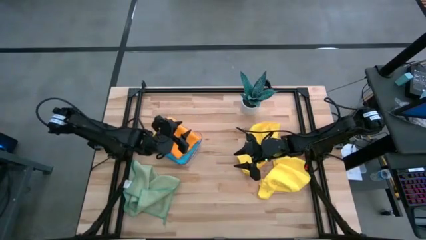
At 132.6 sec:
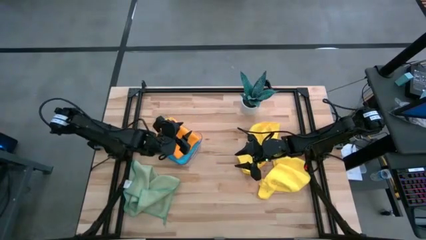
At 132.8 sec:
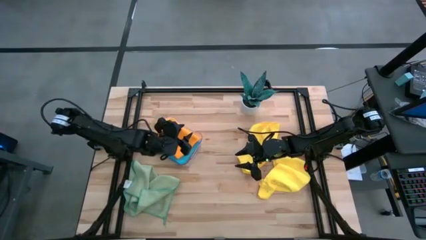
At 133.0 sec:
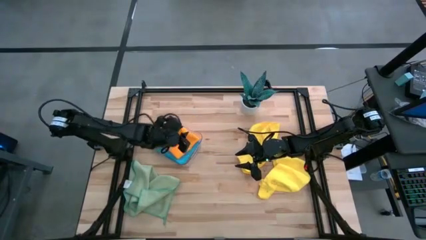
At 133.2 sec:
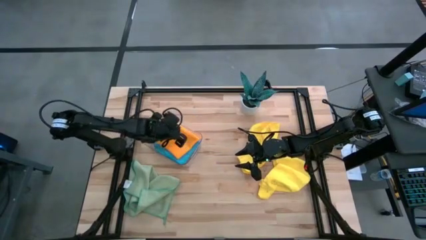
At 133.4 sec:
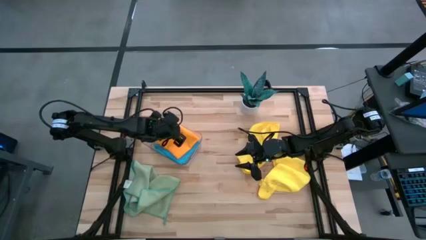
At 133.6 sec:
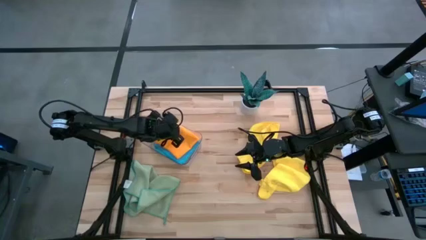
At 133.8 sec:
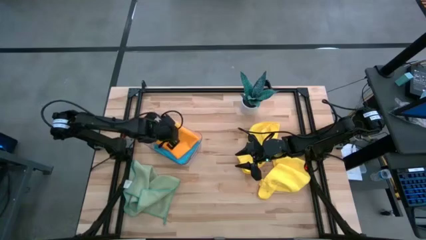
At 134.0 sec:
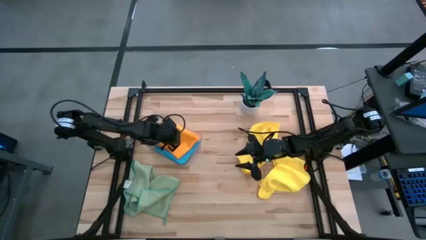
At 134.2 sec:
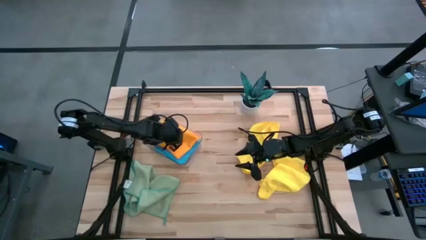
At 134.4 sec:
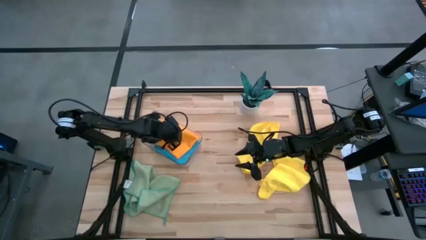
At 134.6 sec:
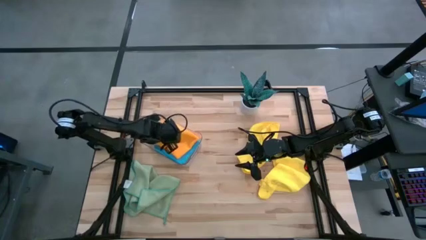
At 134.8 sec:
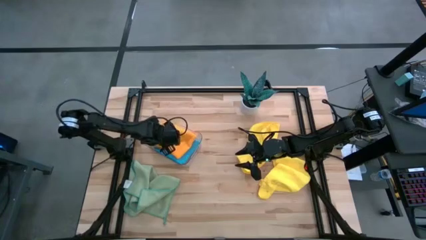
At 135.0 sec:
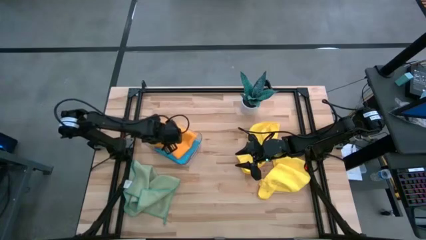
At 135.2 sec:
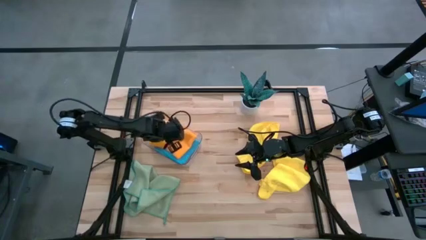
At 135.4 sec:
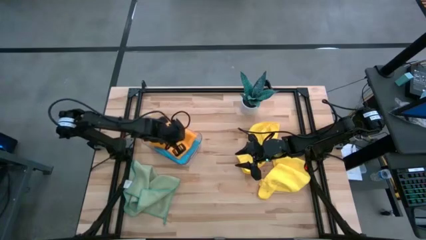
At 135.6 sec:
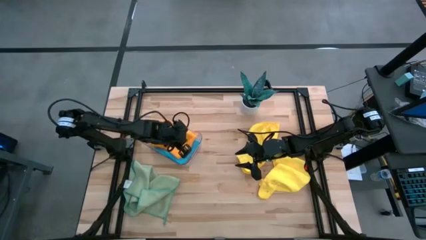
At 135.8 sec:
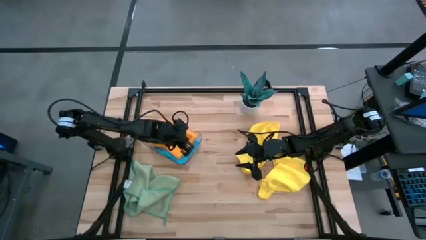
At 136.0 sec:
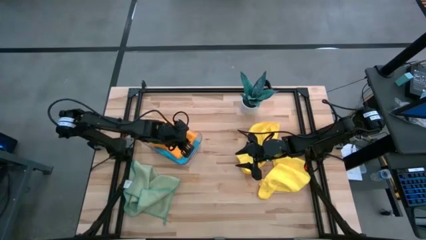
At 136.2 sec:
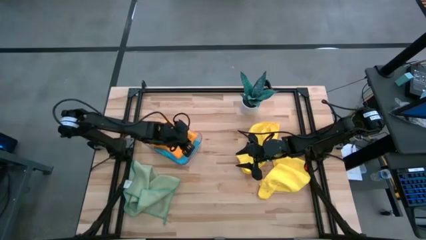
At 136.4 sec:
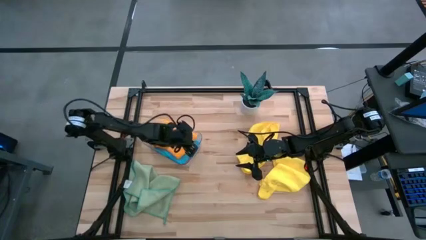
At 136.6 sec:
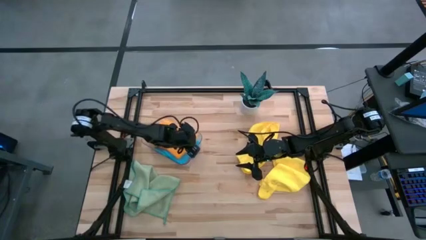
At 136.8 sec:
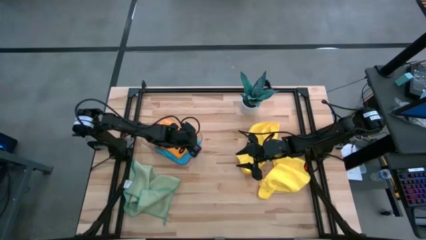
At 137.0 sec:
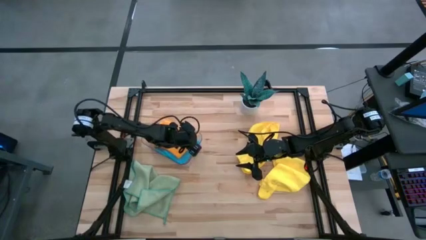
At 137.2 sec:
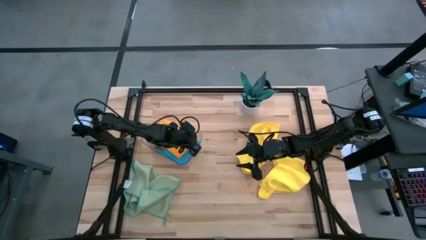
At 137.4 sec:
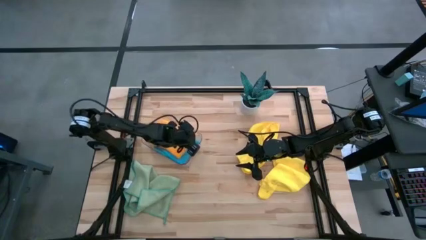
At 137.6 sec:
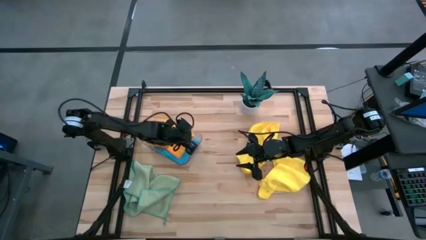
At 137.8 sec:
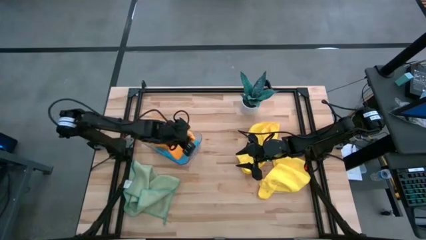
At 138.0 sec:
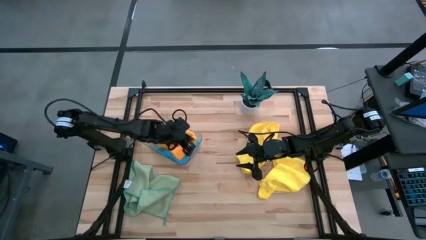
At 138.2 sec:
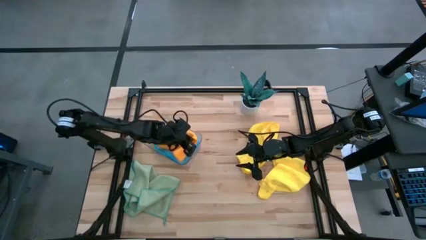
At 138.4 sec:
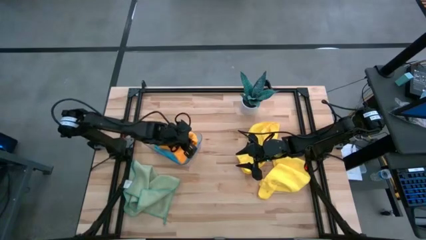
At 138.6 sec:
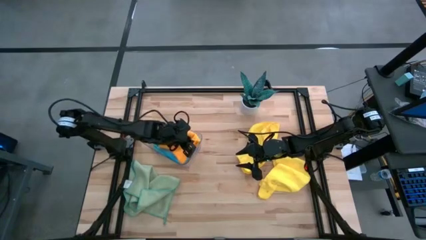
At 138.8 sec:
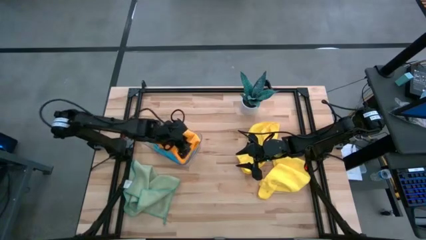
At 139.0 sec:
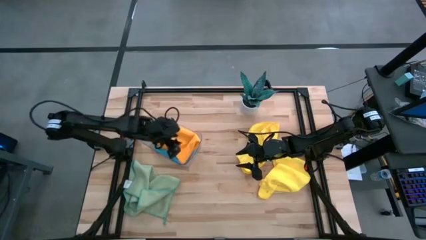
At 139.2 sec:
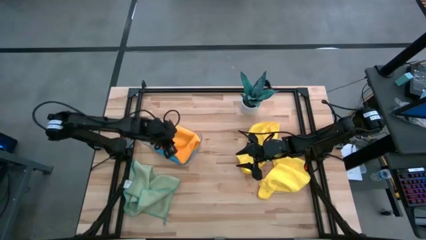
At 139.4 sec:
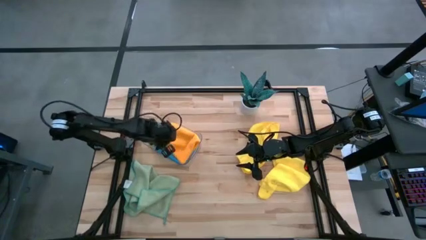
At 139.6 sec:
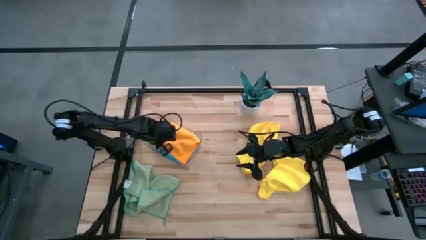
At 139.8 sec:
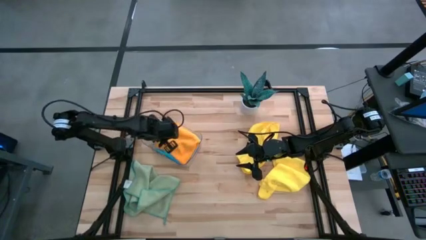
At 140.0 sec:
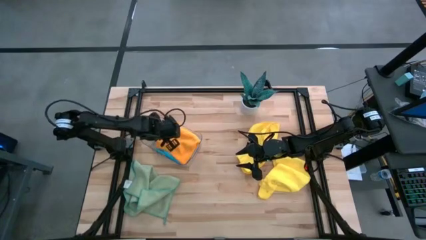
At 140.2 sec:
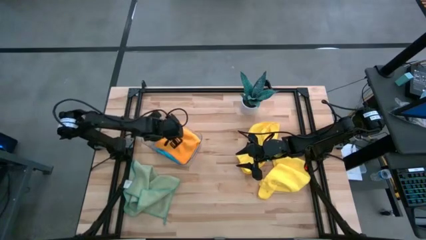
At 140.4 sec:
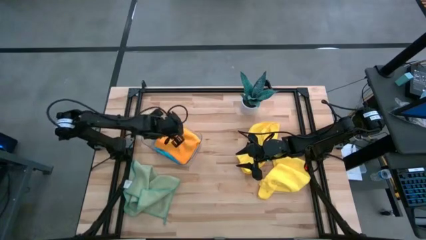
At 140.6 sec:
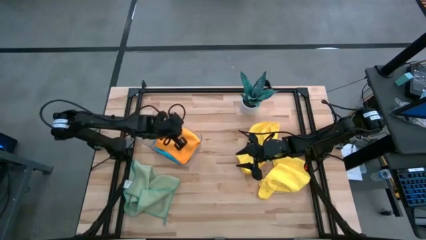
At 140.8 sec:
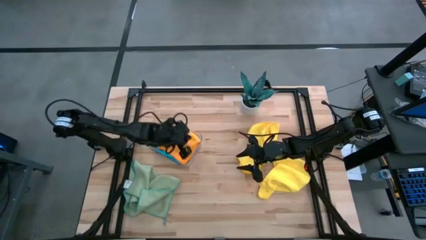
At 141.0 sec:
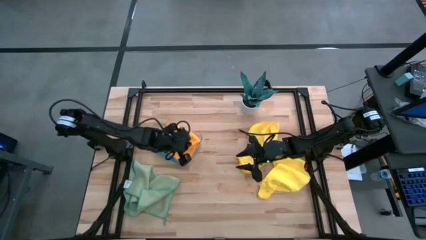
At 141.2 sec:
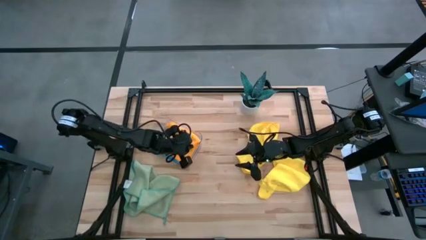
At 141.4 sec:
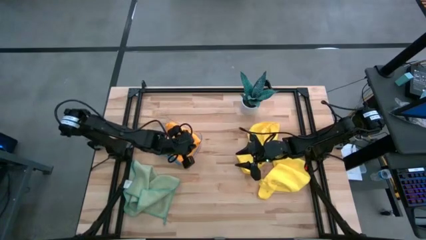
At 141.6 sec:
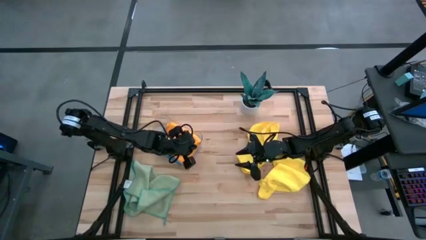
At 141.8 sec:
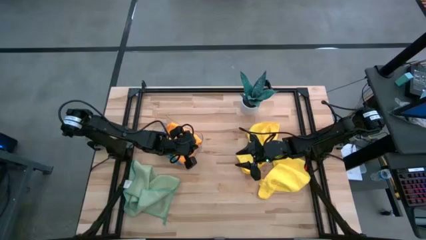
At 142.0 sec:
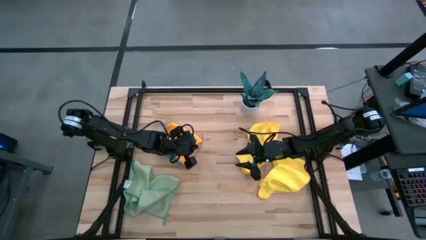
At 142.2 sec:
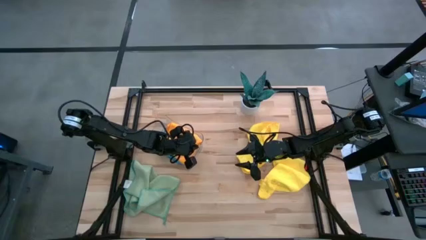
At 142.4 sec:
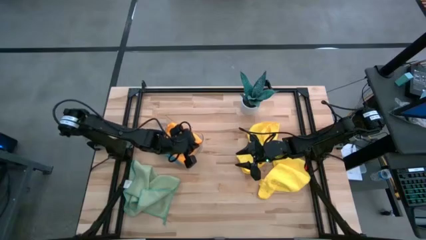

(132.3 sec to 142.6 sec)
Task: Fold microfiber towels
Put the orange microfiber cloth into the transparent bin

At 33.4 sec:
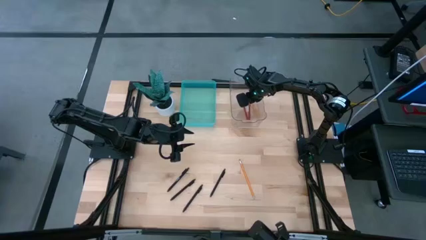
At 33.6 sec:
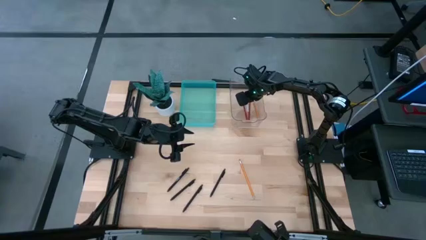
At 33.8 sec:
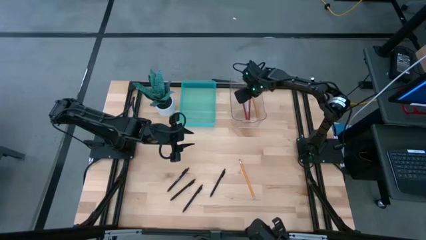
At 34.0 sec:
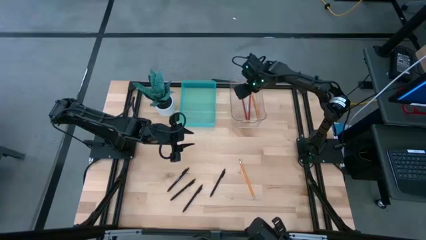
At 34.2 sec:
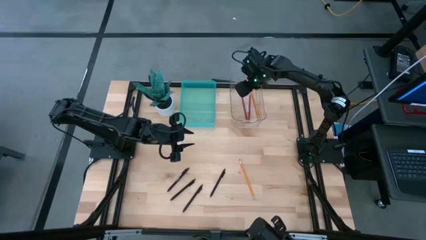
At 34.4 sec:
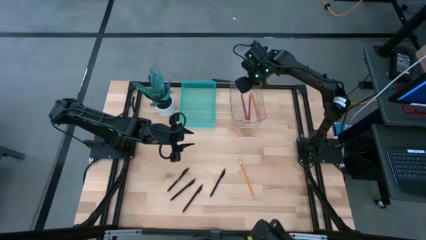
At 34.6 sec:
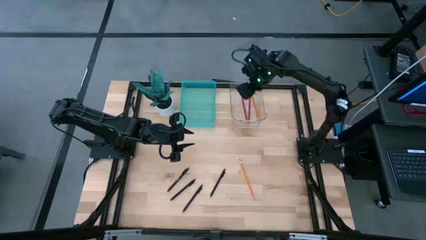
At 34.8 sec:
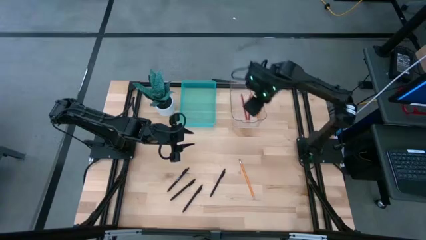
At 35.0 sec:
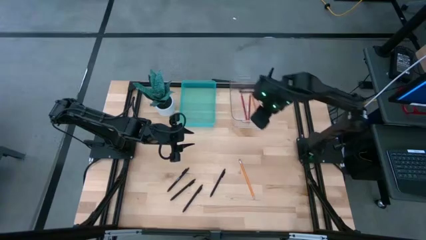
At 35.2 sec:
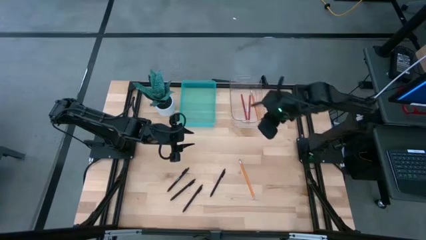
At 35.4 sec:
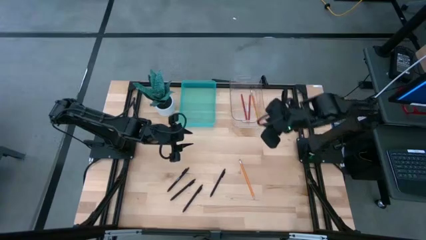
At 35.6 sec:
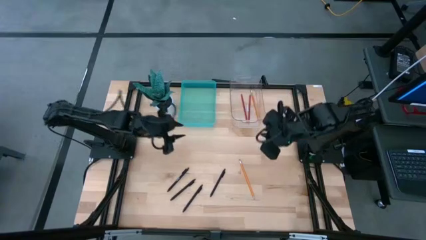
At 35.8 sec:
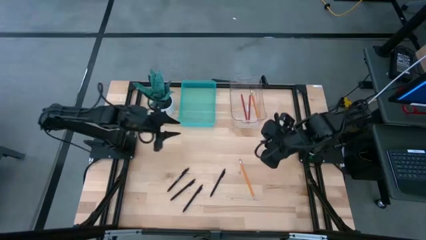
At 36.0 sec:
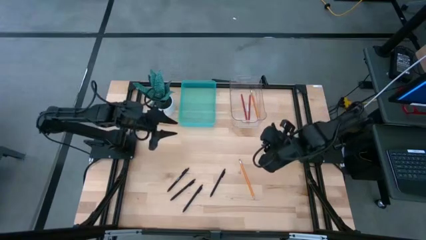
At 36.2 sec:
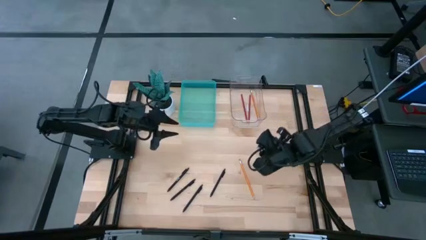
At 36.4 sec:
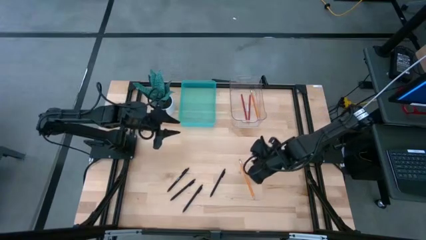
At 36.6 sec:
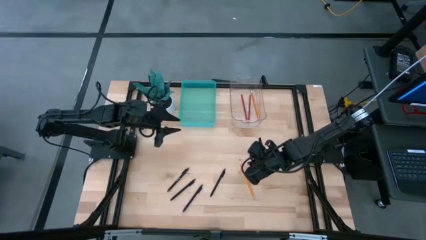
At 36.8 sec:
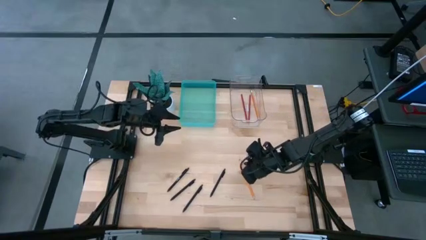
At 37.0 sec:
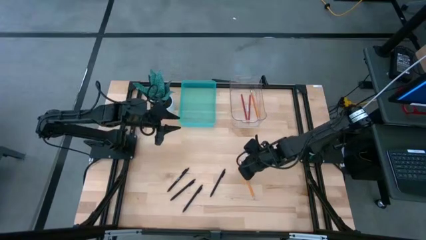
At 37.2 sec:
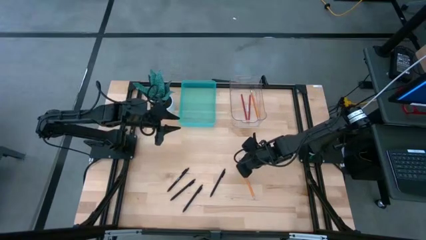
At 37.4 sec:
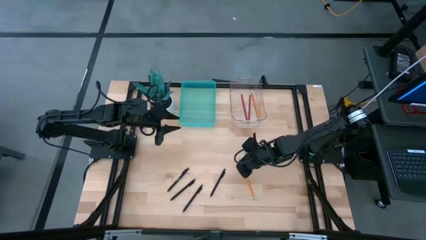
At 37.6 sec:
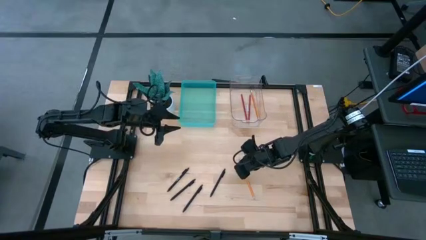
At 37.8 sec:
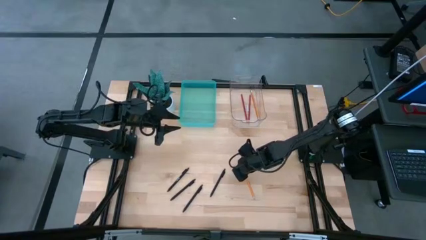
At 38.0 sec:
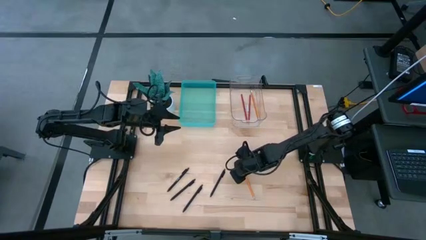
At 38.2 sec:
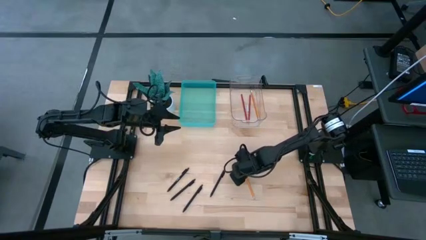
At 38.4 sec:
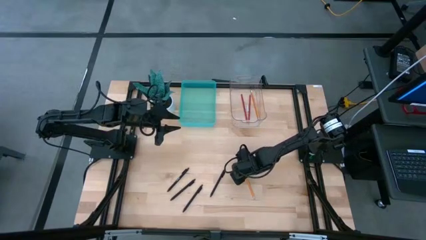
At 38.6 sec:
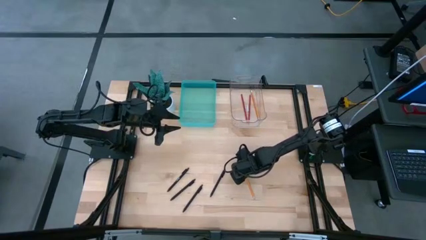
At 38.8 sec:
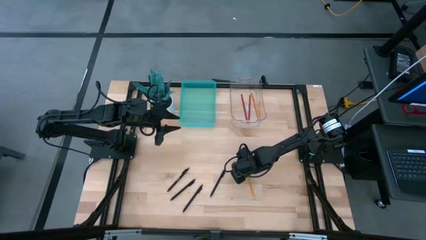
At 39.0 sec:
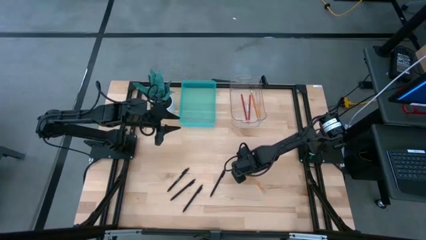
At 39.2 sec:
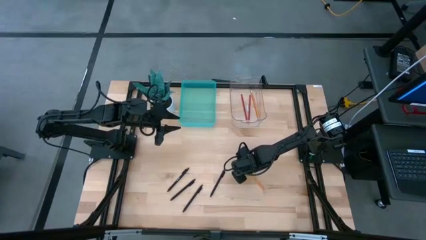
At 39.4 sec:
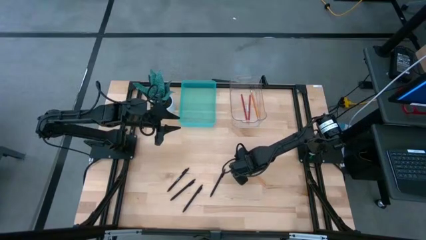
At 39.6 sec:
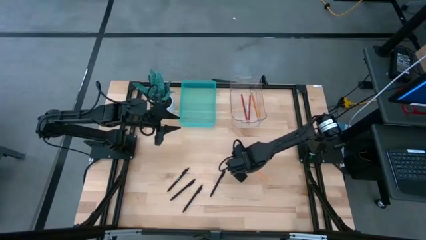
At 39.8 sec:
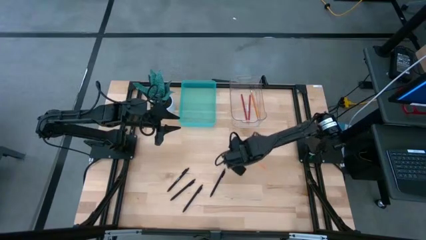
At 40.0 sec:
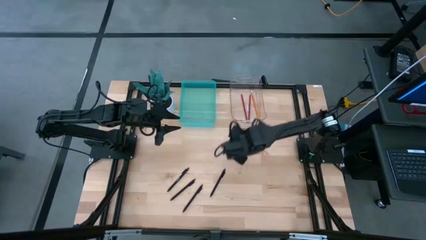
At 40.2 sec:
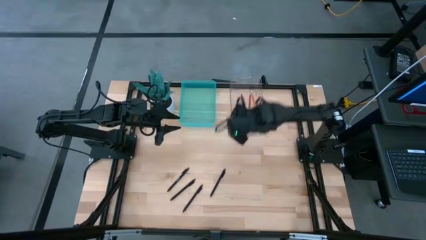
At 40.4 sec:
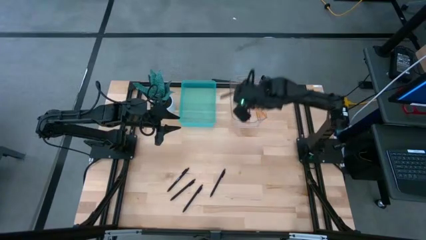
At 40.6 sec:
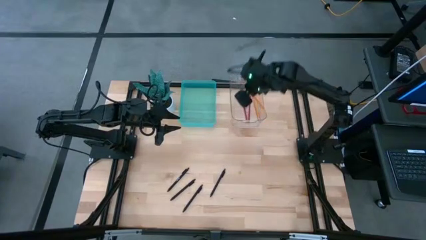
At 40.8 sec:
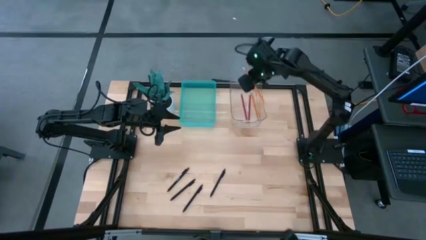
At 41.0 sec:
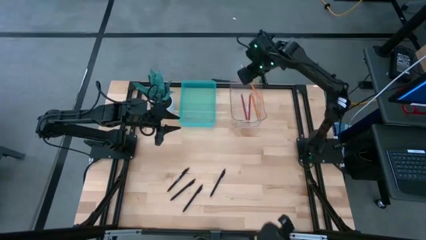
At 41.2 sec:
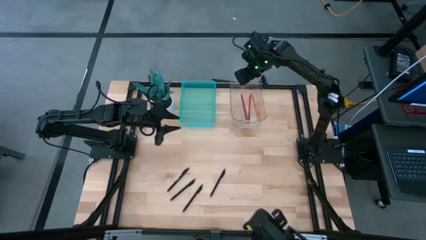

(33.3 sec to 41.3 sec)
Task: Sort pens & pencils
Put the yellow pencil into the transparent bin
